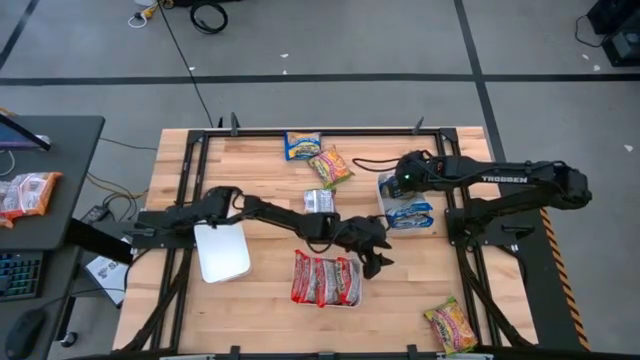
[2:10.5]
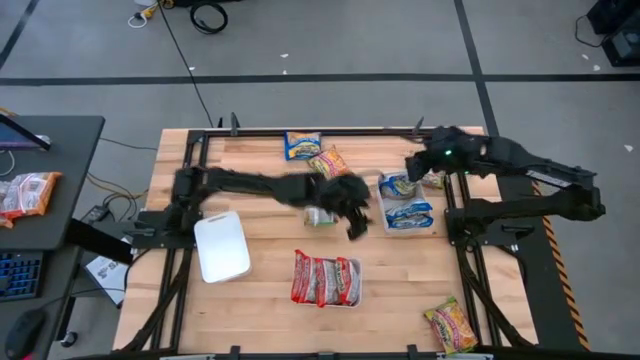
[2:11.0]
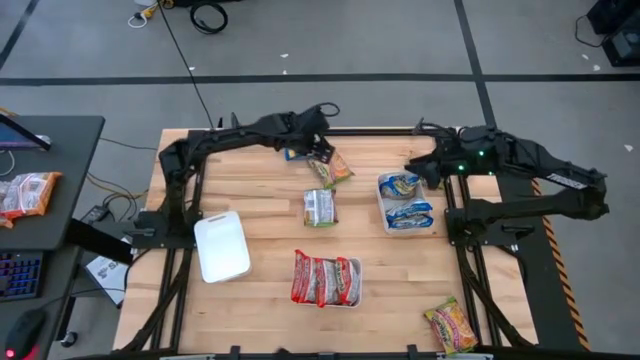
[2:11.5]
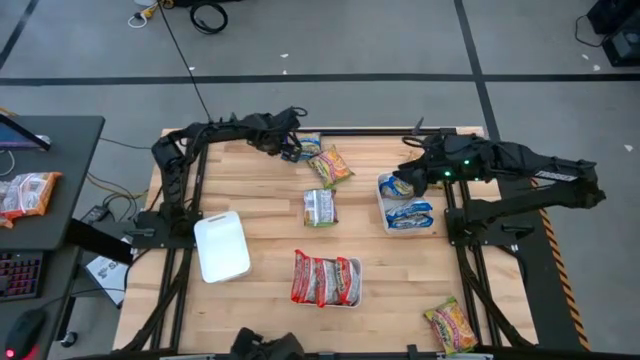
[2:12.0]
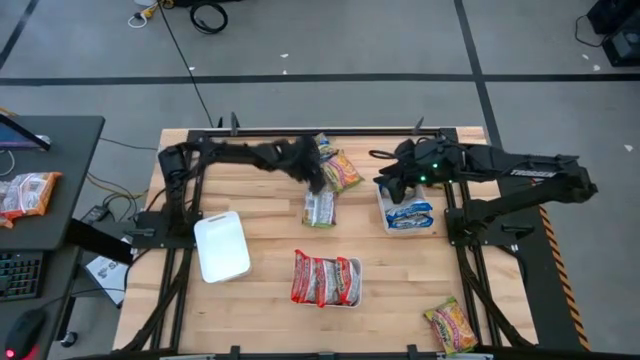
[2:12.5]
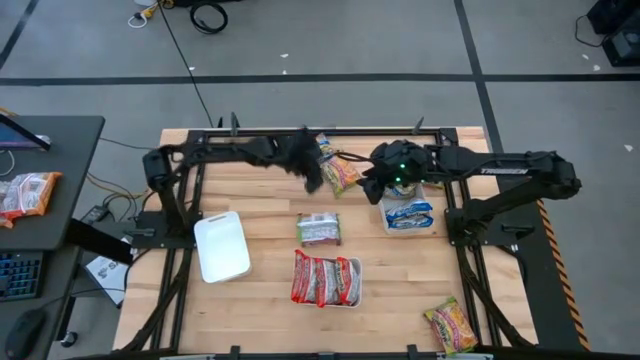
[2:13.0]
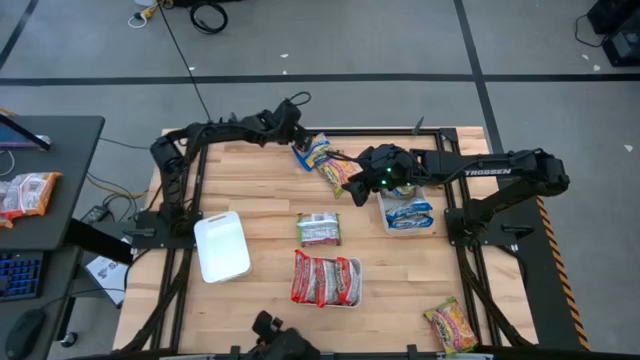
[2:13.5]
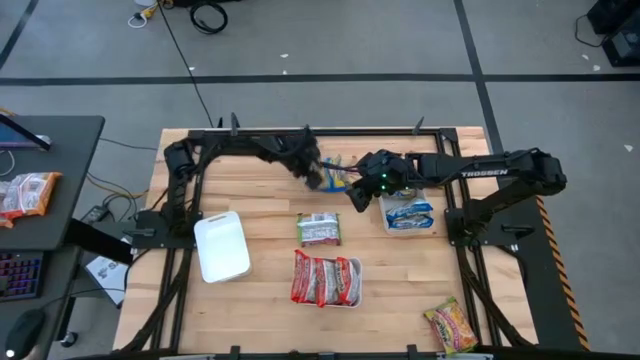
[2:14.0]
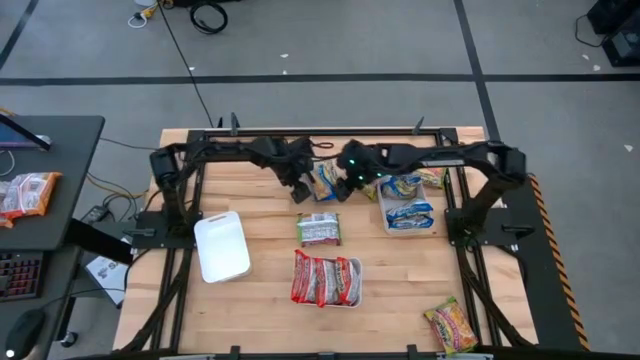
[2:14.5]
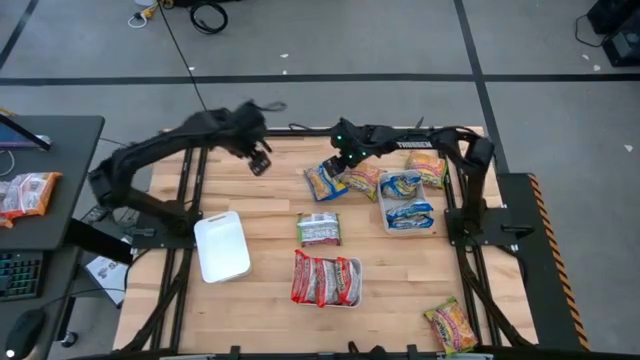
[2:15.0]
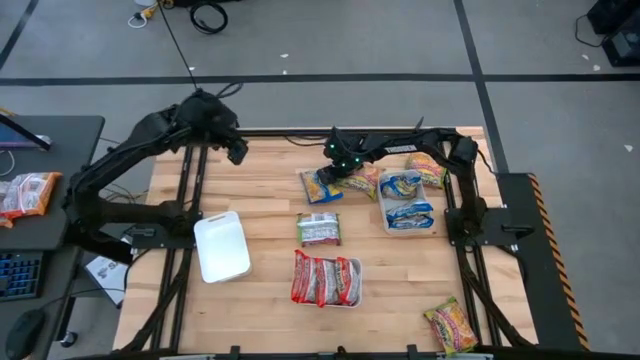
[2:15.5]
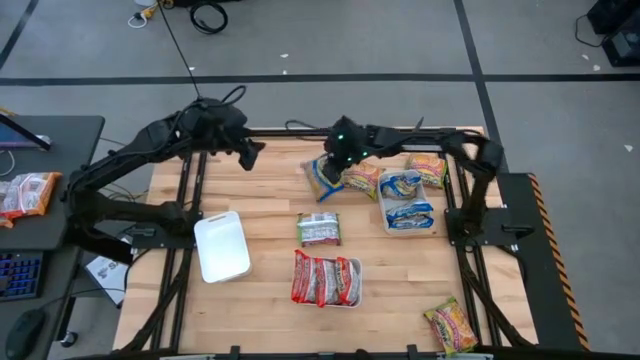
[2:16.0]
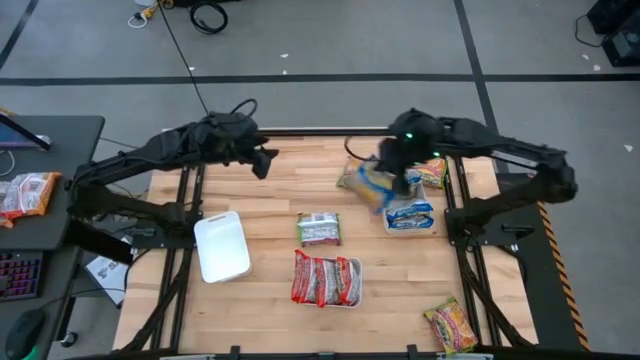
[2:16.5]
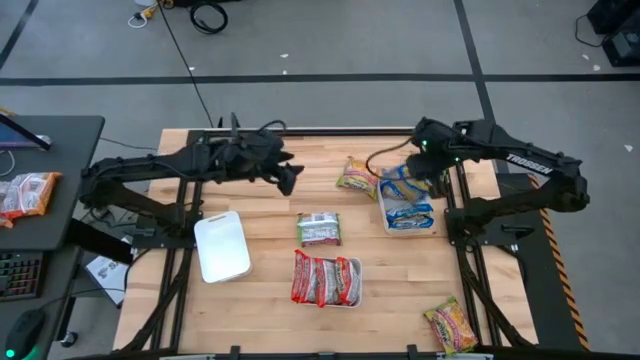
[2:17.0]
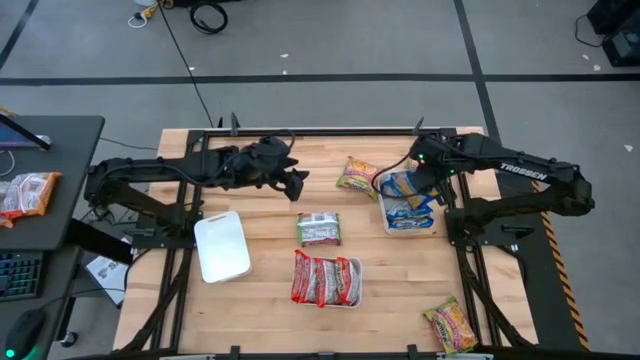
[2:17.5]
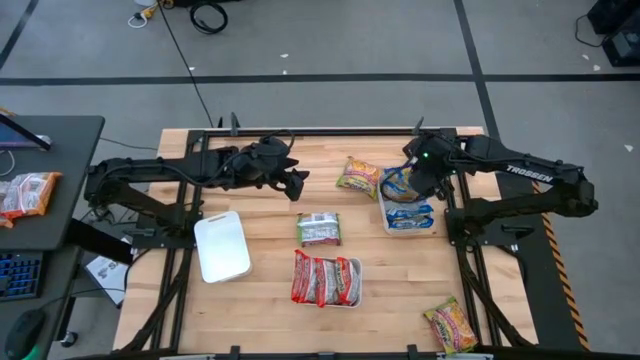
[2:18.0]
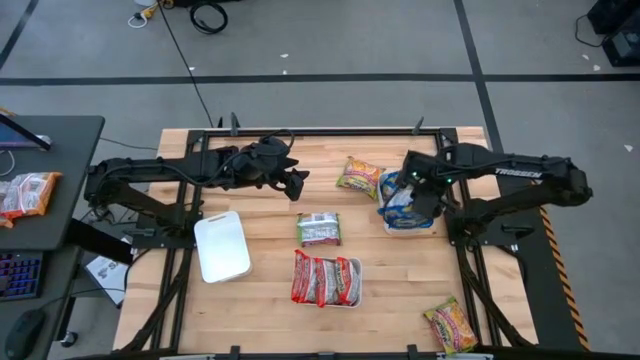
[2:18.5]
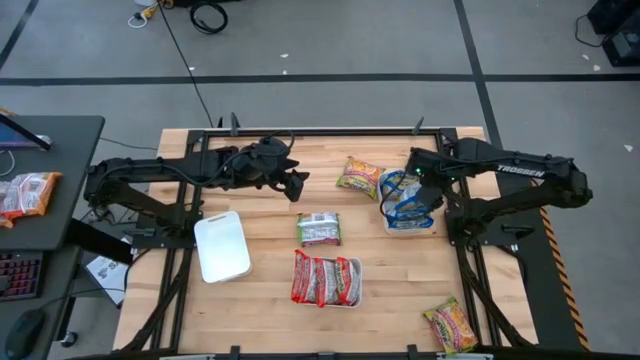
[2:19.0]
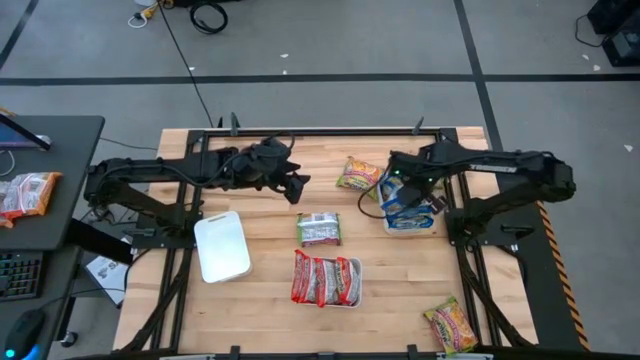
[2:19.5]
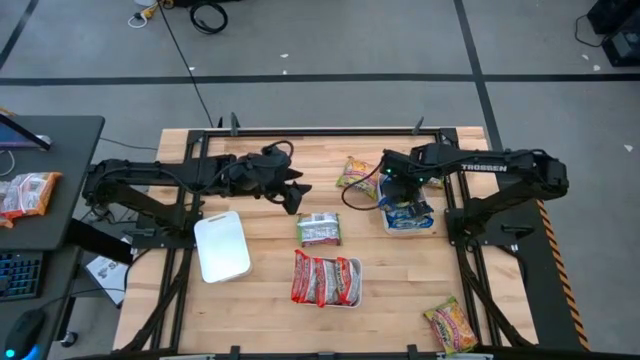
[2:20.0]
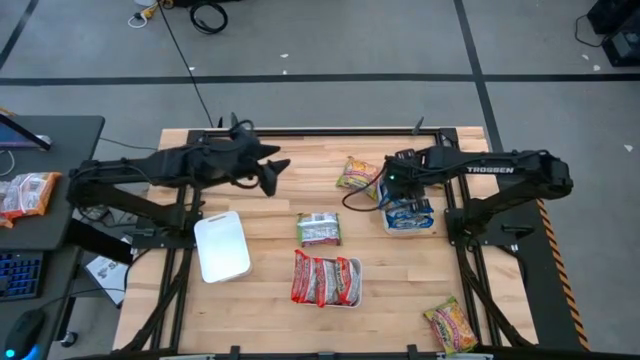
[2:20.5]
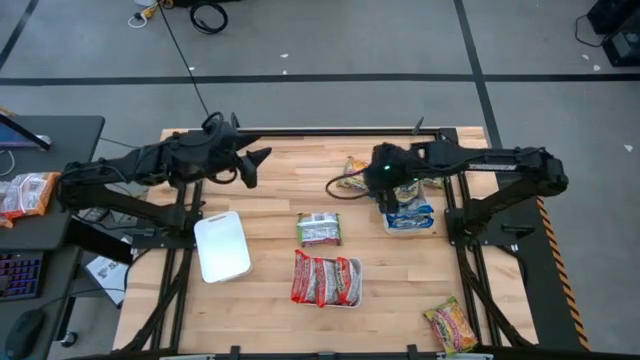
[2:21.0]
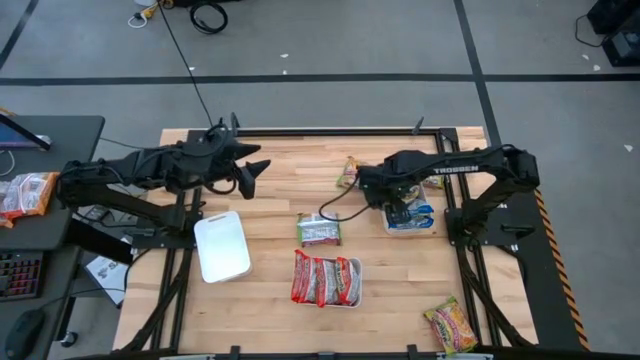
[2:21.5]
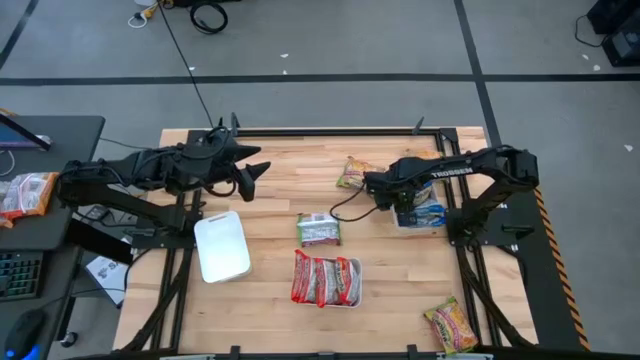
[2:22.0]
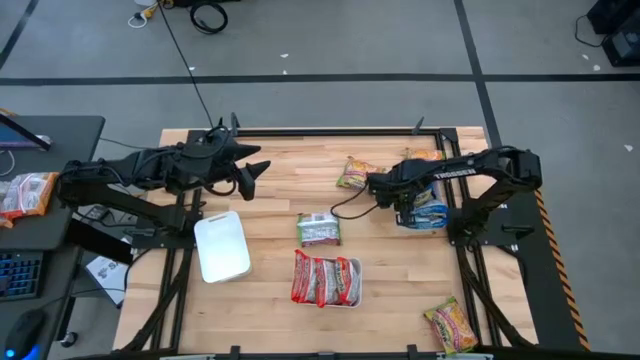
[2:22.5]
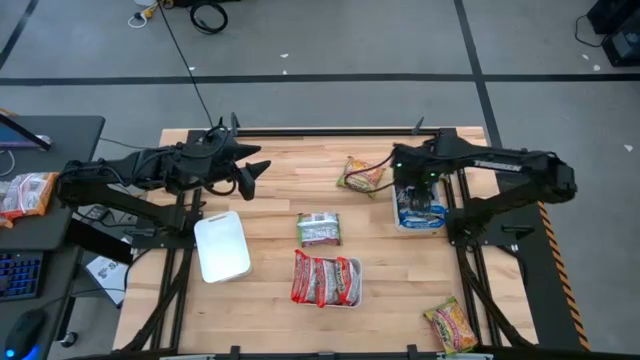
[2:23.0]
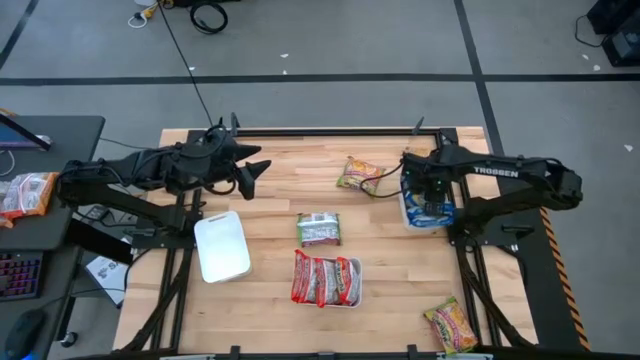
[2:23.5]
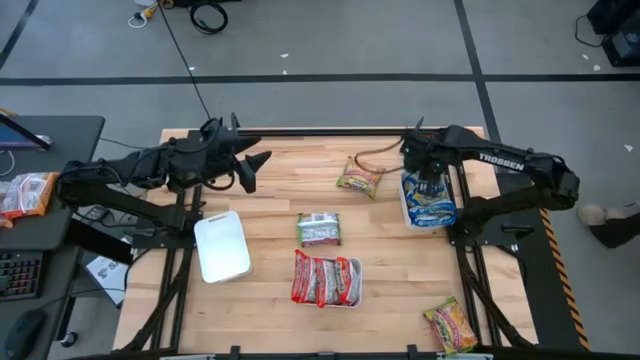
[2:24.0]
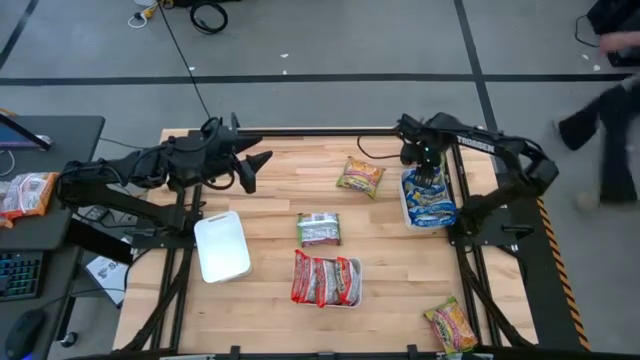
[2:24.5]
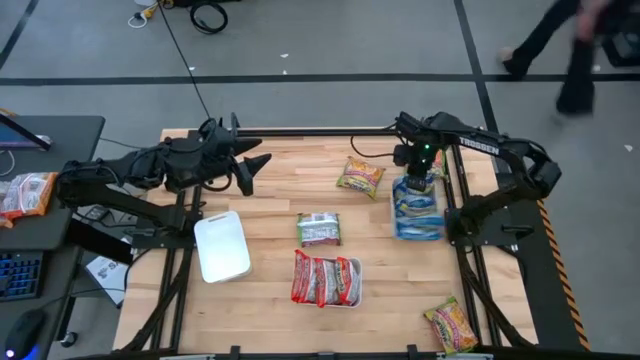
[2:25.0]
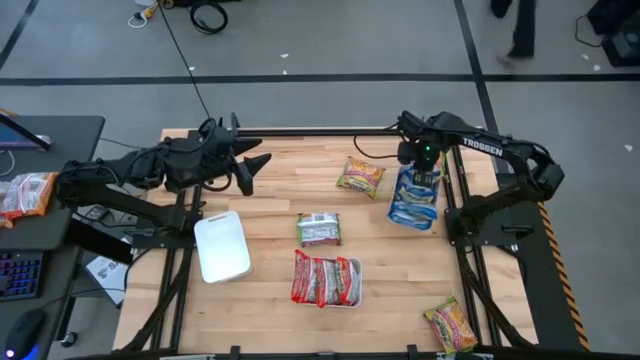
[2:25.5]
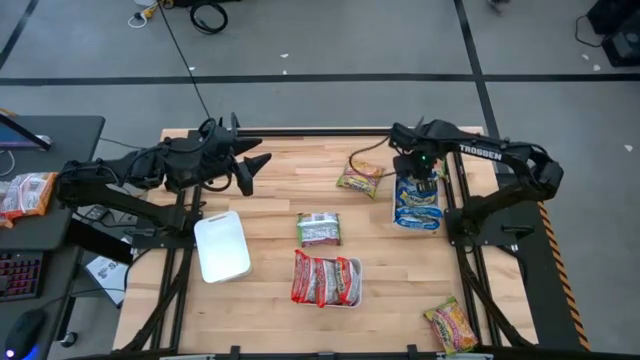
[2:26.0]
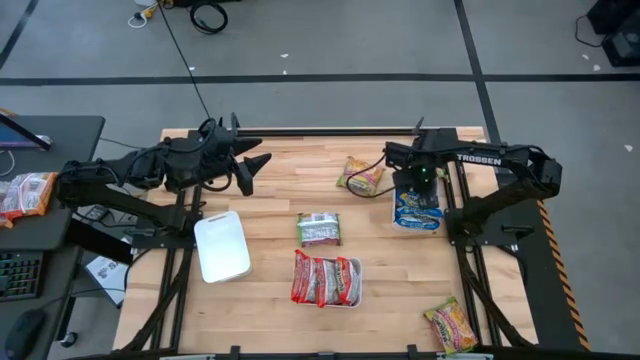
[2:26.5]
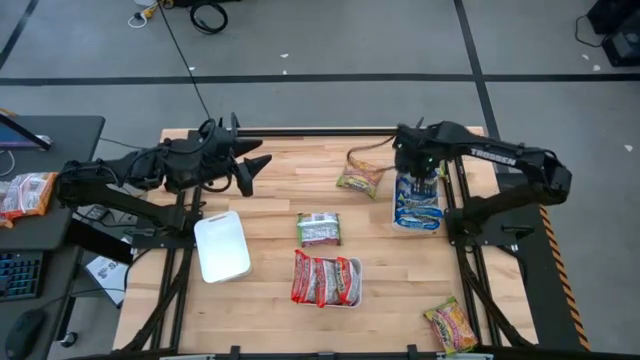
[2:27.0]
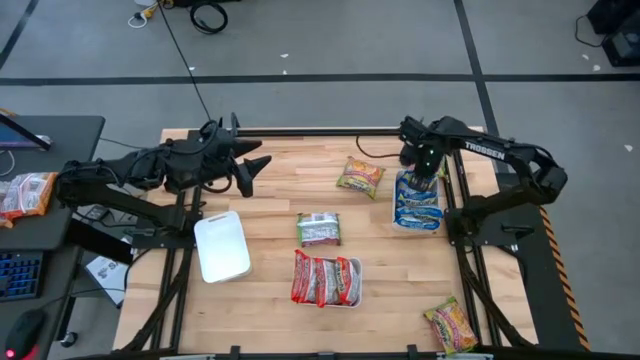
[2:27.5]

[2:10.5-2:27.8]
Task: Sort Maruchan noodles
Put the blue noodle pack into the right white bin

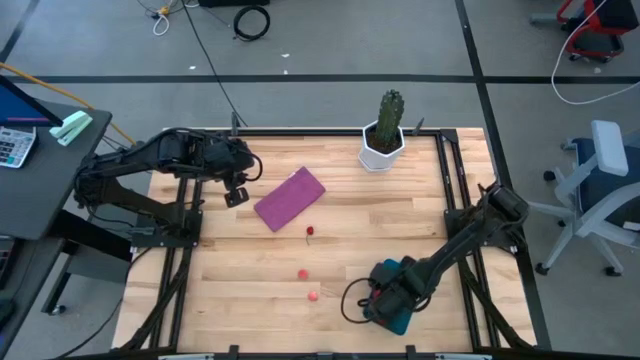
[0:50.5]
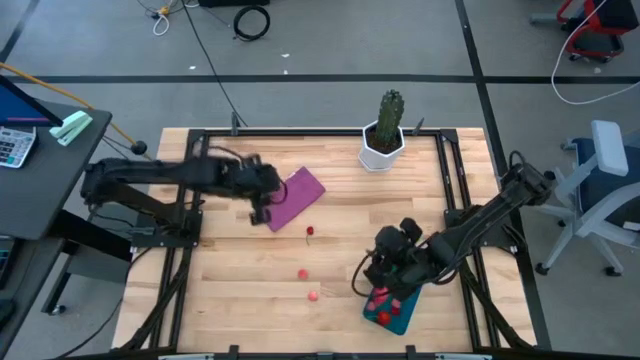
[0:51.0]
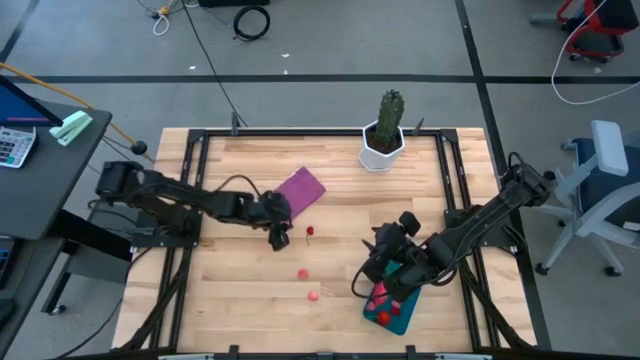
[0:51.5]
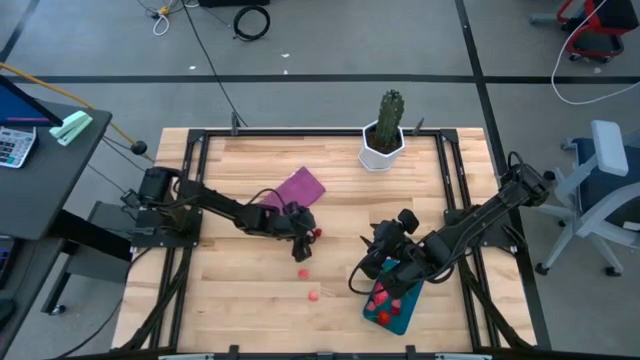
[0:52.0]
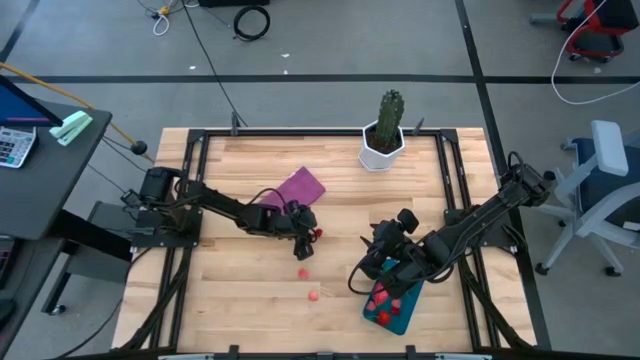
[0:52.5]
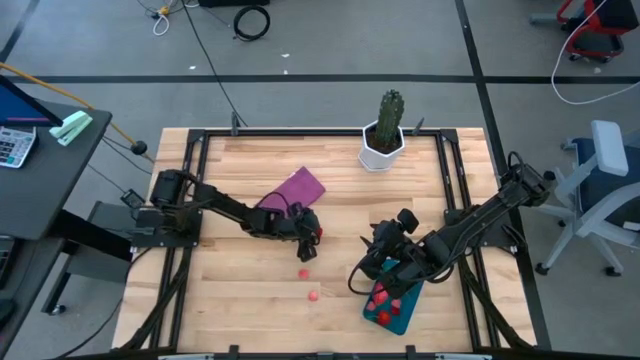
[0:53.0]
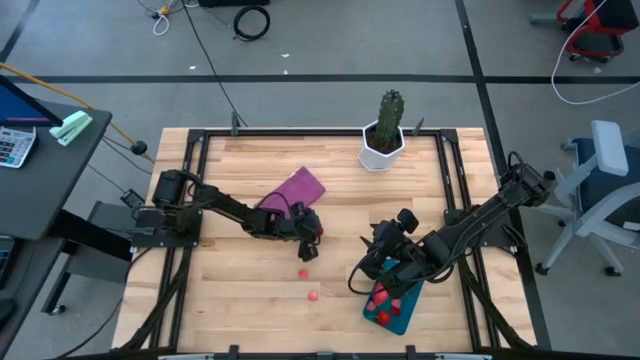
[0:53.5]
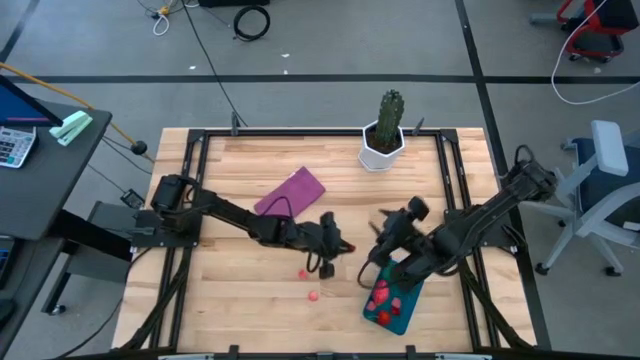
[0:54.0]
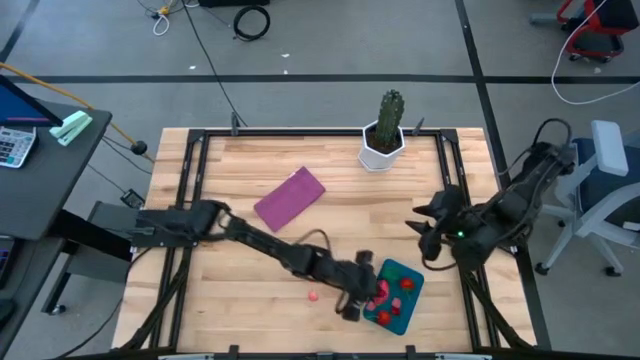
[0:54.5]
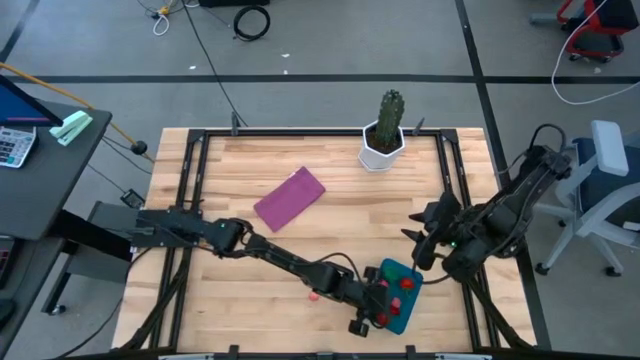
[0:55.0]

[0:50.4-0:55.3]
Task: Pick and placing Produce into tupperware
Put the cherry into the blue bin
